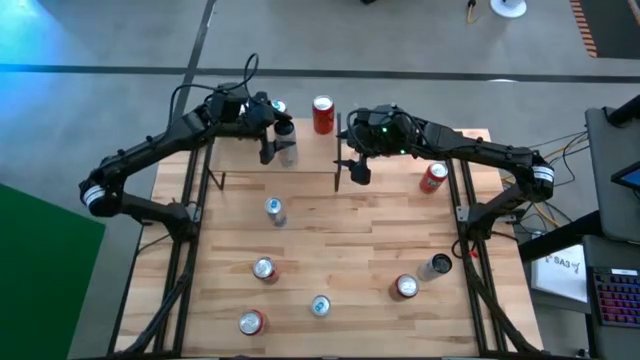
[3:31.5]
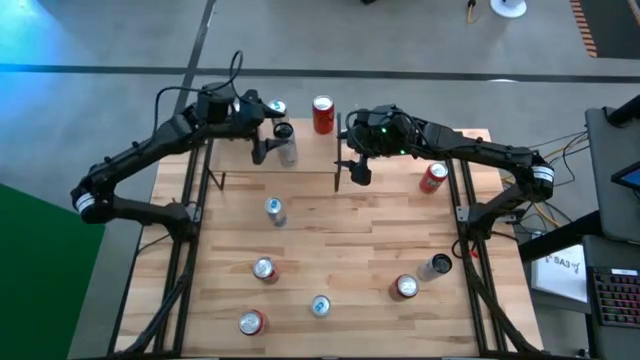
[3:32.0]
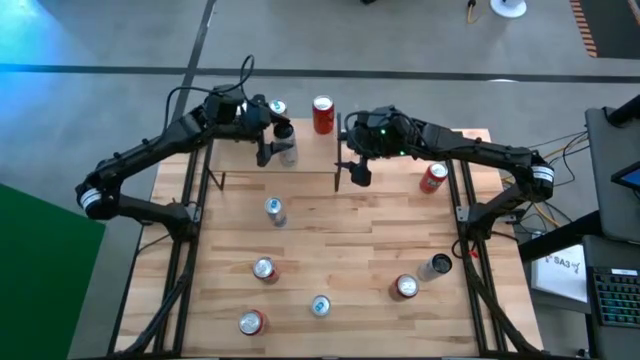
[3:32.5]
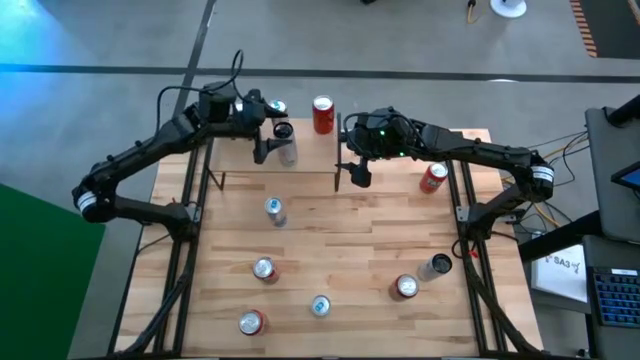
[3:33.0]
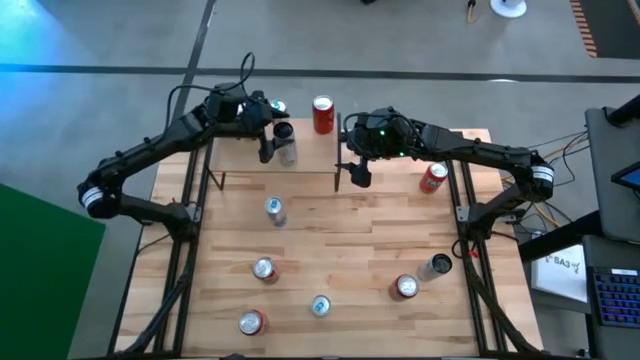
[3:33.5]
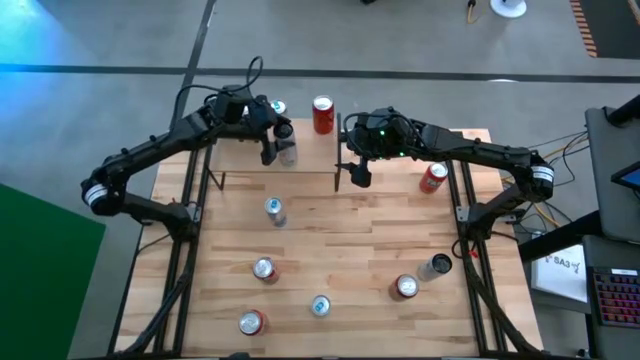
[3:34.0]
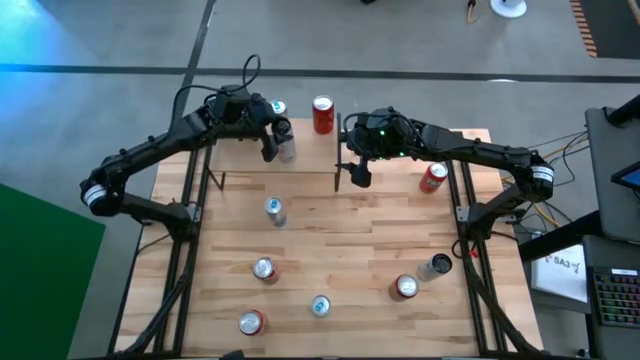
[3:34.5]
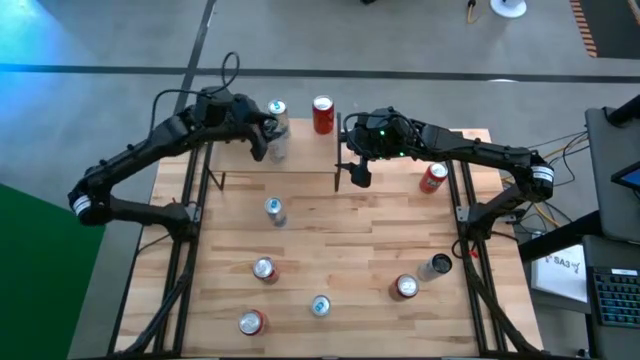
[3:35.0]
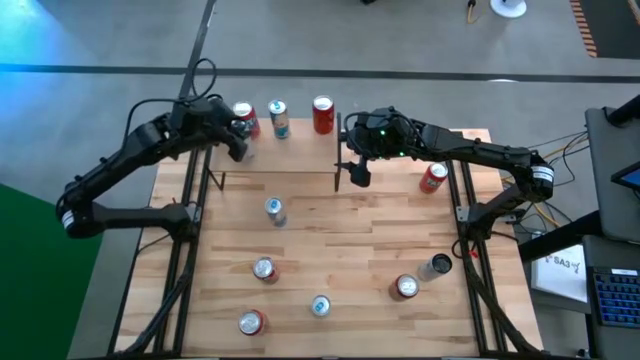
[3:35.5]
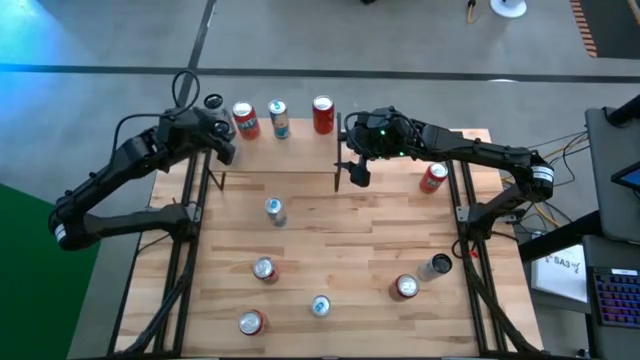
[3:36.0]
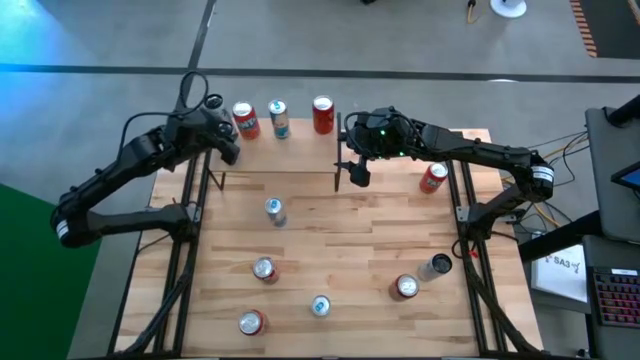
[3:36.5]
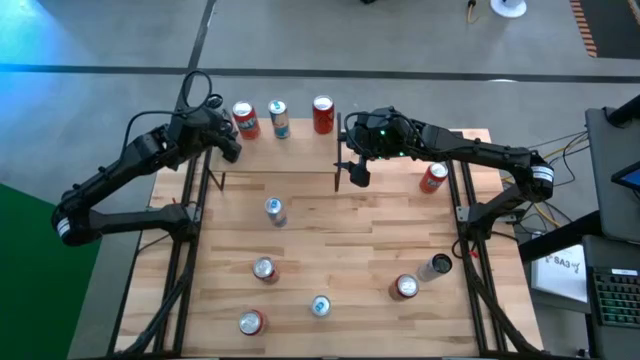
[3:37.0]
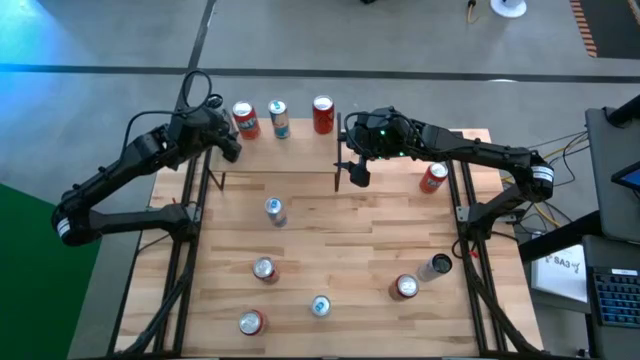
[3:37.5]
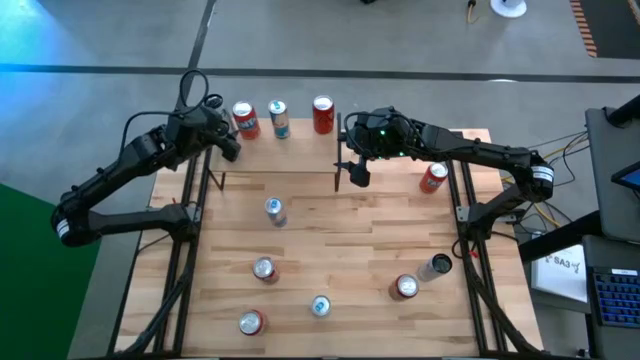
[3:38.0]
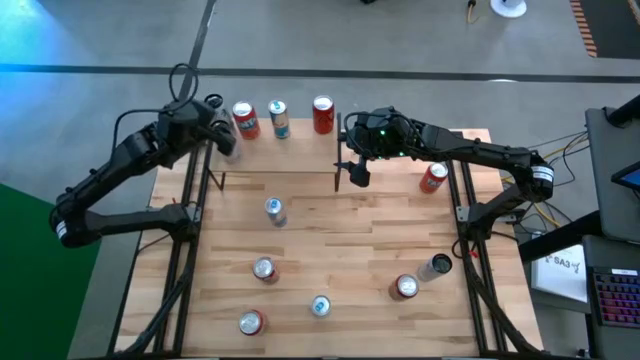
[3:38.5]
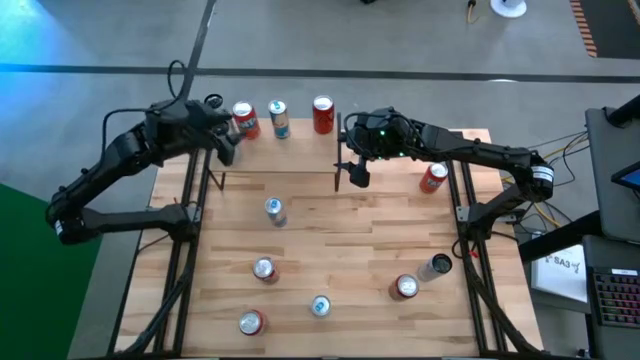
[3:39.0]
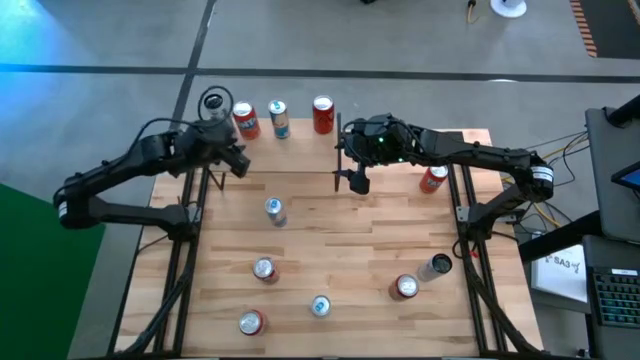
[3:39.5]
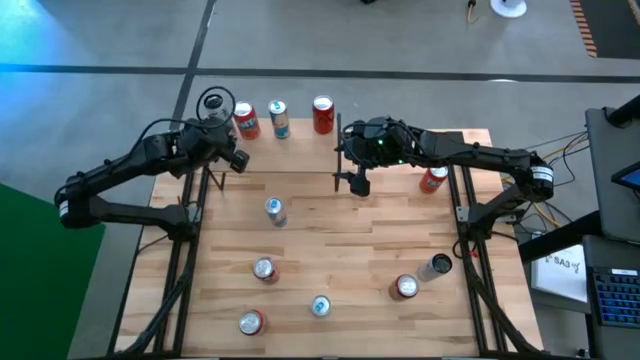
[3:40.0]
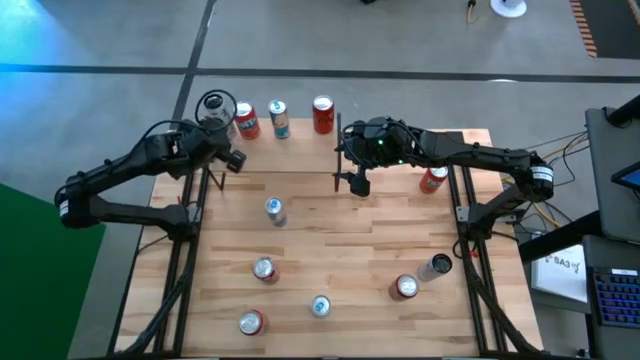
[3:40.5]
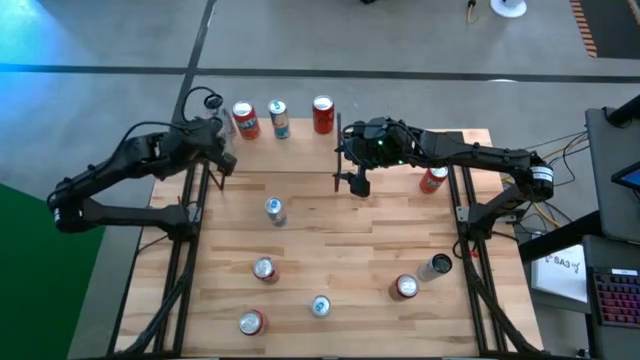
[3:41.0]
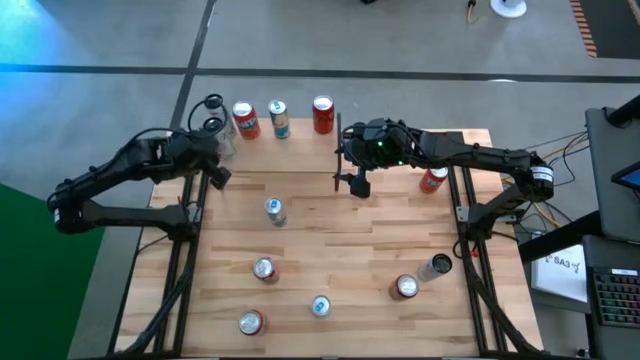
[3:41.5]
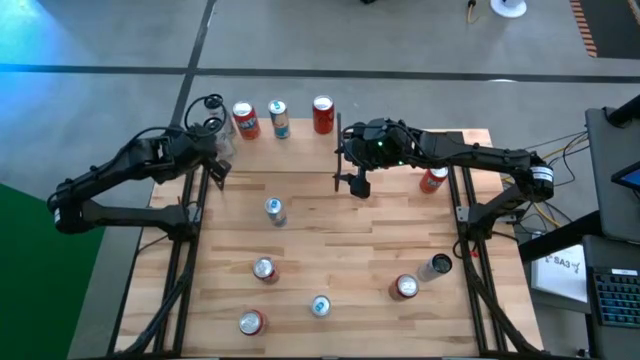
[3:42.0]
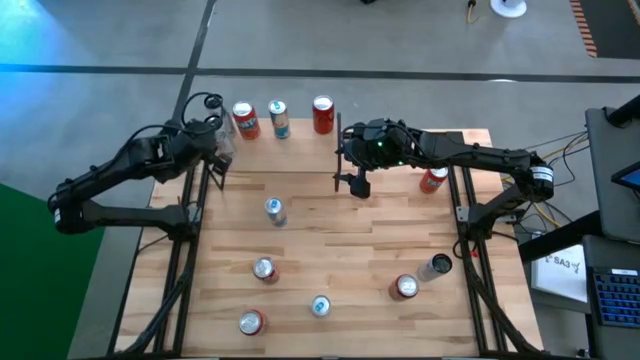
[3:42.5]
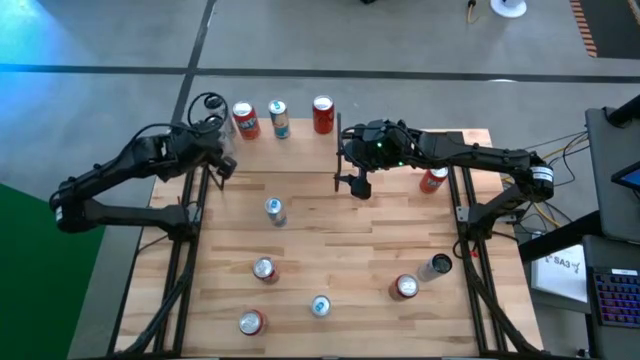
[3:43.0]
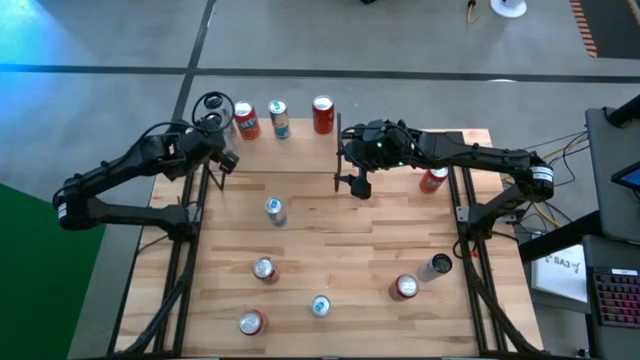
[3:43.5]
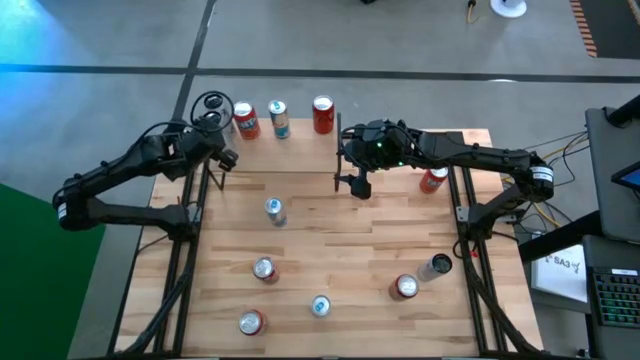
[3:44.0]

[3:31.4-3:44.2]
Task: Place canned beverage on shelf
Put the white pink soda can on the shelf

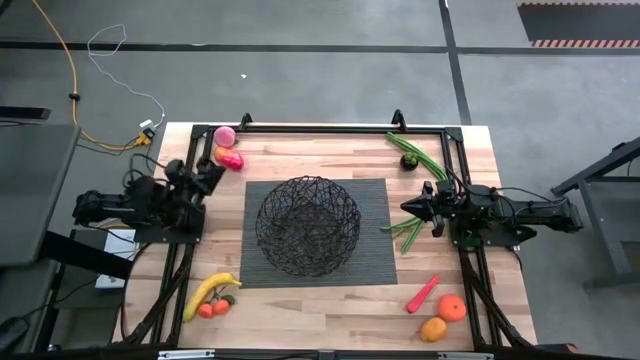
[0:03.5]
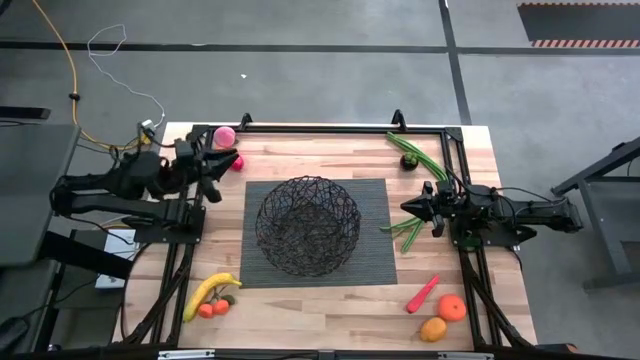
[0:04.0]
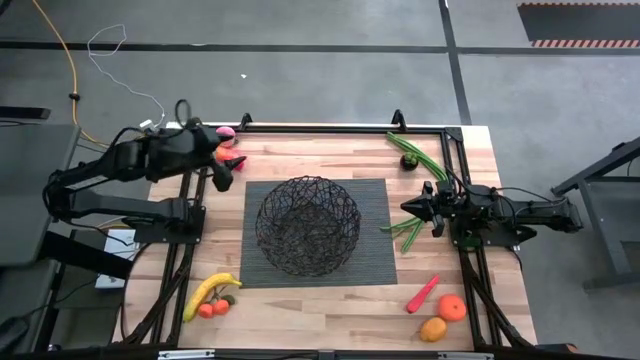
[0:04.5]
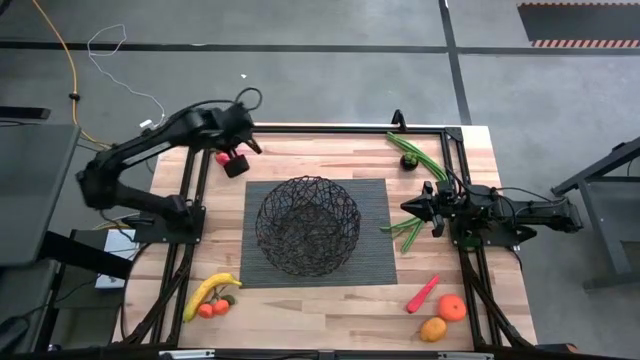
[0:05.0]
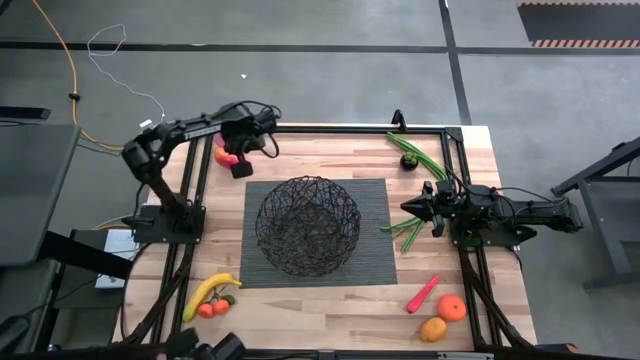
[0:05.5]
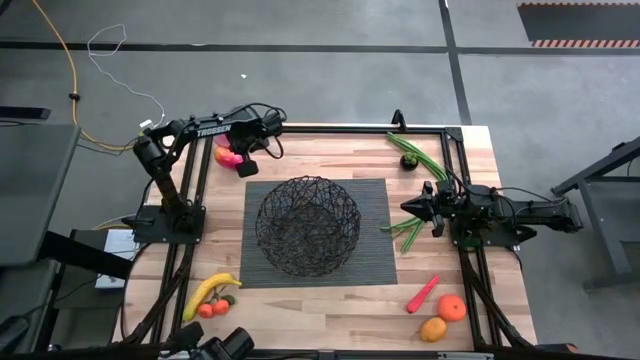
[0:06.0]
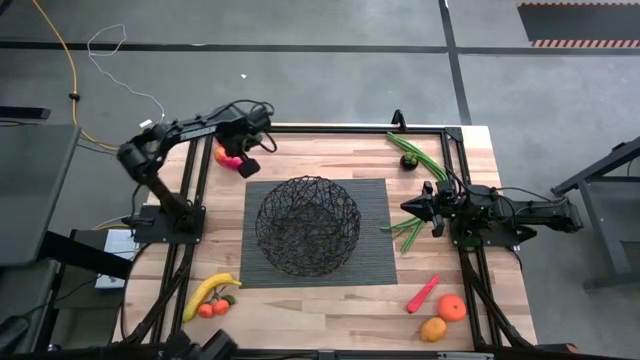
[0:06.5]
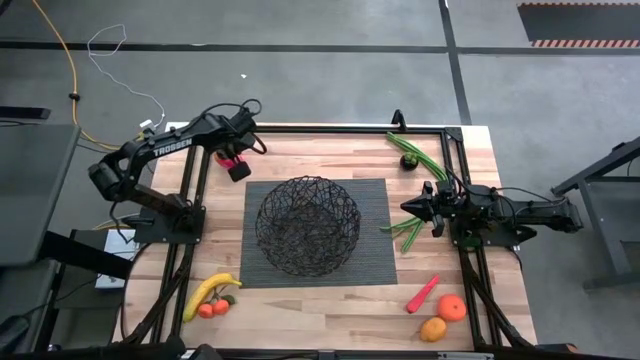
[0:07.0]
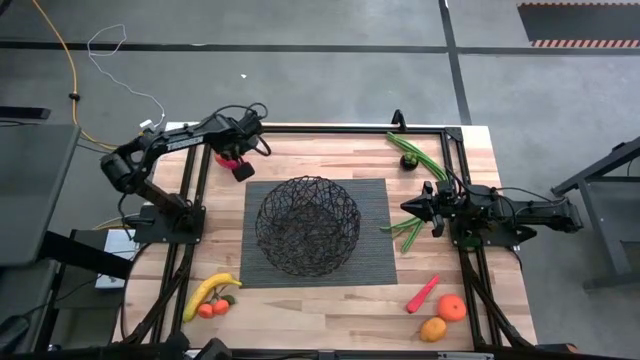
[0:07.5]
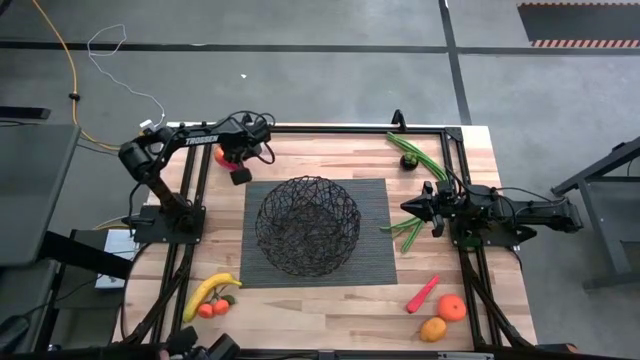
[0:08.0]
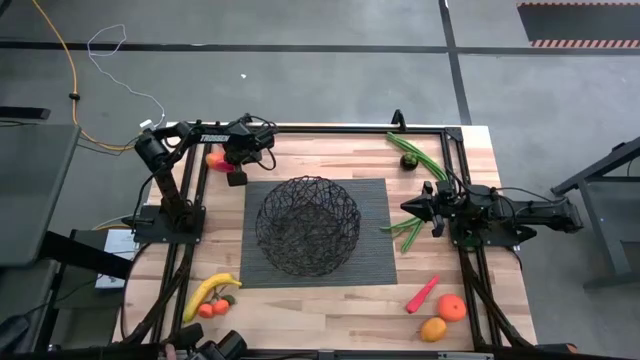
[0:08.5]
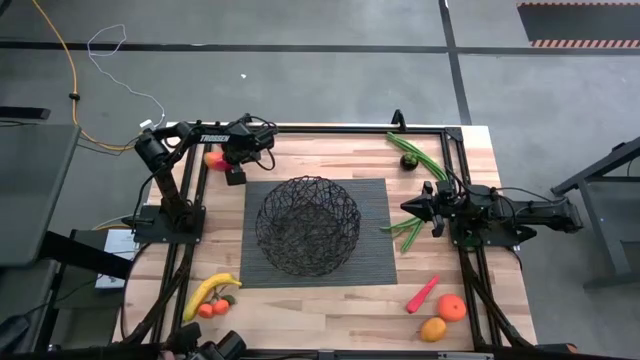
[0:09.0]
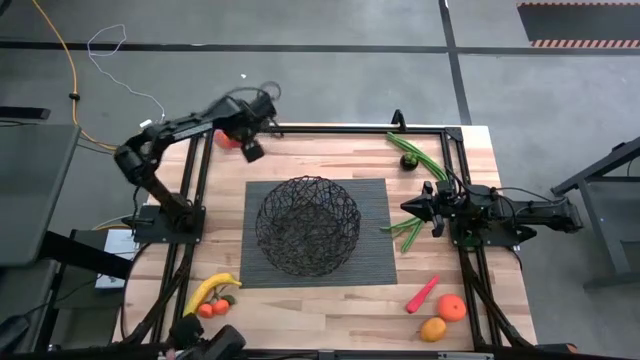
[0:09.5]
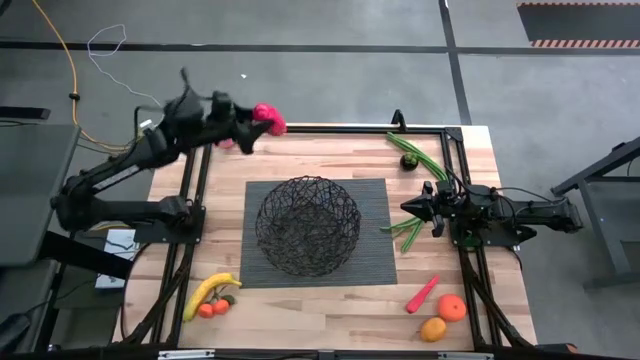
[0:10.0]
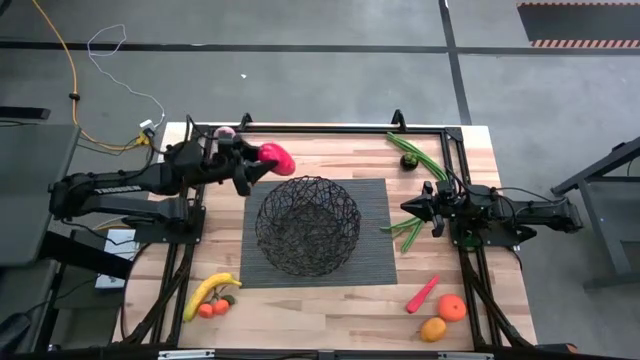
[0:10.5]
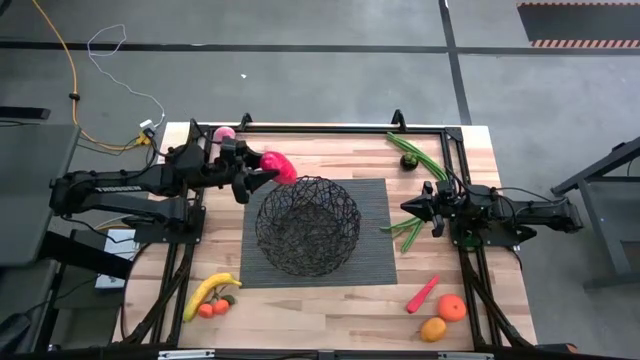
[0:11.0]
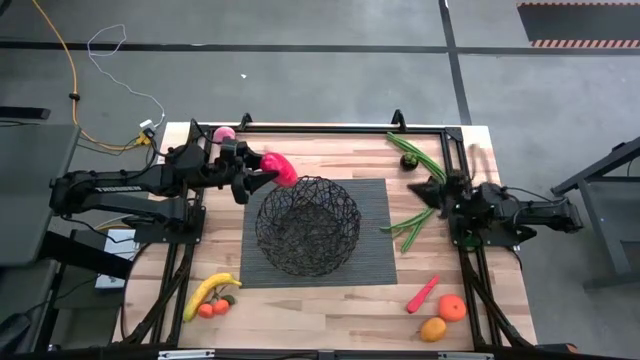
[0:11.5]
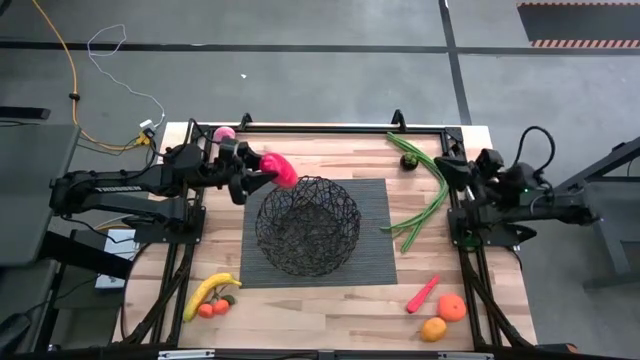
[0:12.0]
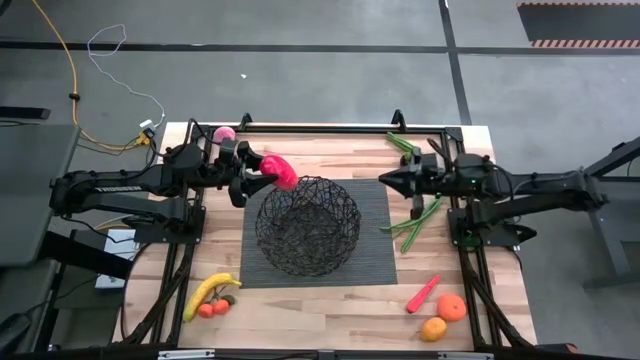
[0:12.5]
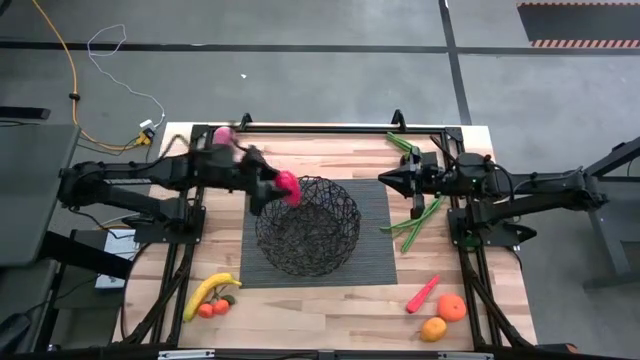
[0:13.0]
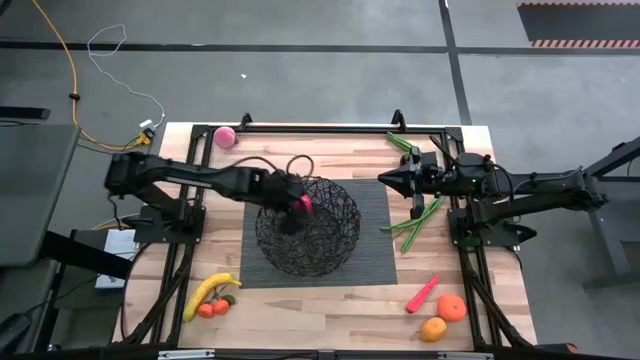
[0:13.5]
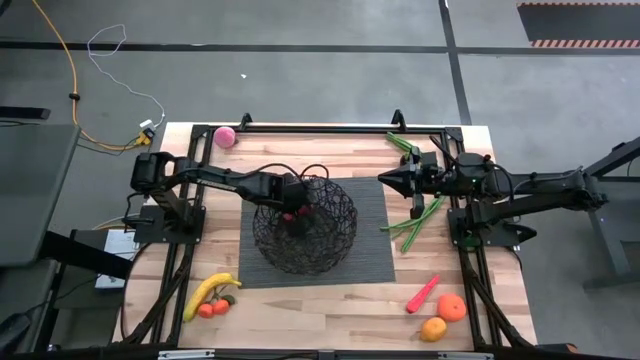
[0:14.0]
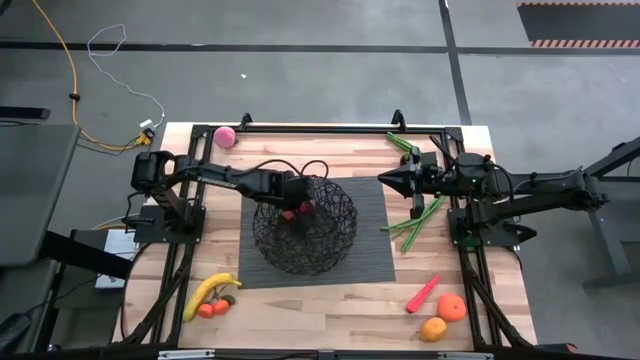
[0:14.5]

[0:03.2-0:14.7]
Task: Build produce basket
Put the orange mango into the black mesh basket
